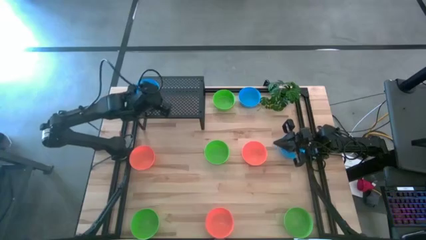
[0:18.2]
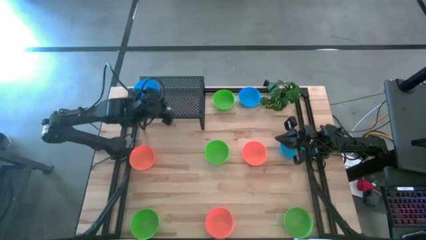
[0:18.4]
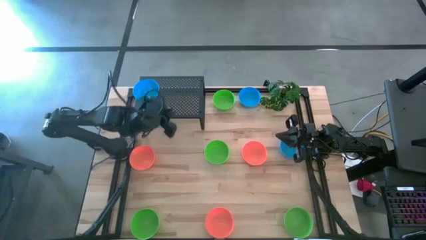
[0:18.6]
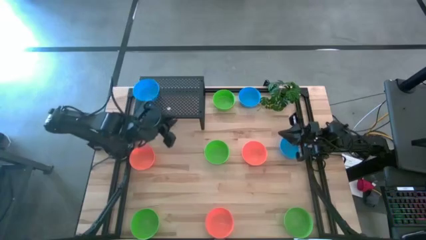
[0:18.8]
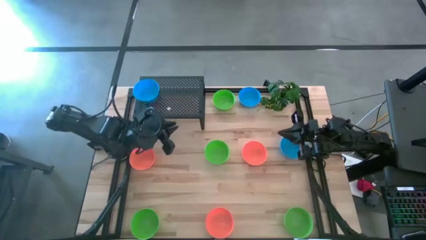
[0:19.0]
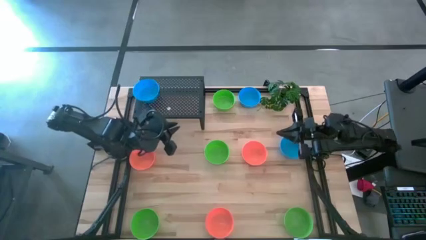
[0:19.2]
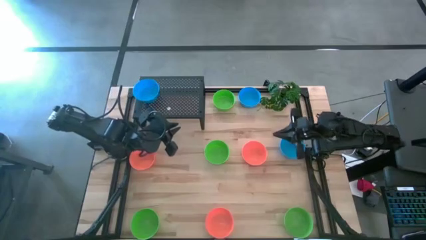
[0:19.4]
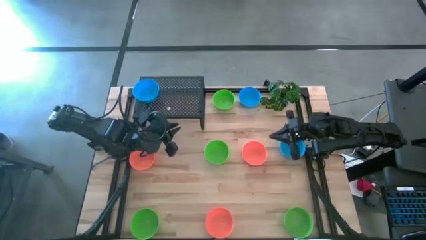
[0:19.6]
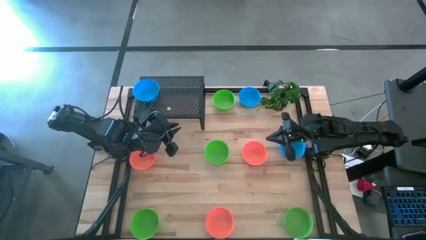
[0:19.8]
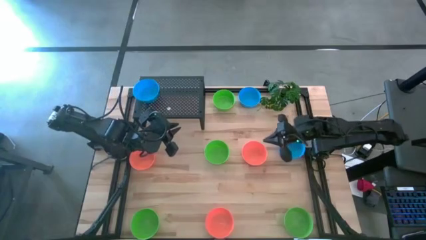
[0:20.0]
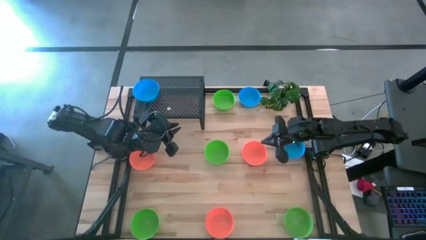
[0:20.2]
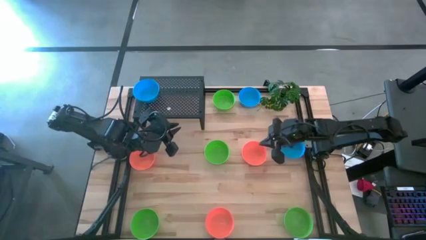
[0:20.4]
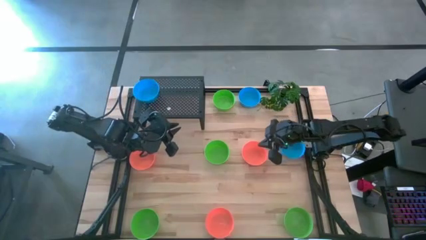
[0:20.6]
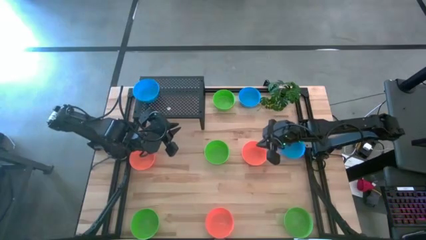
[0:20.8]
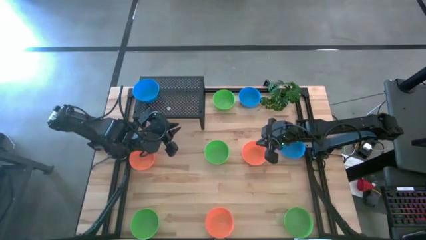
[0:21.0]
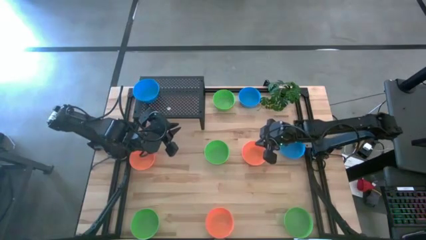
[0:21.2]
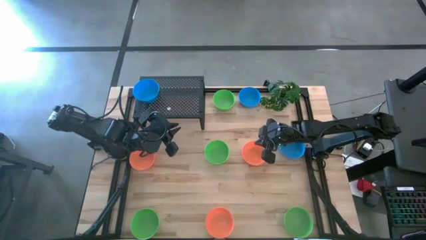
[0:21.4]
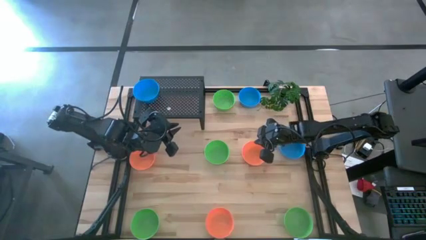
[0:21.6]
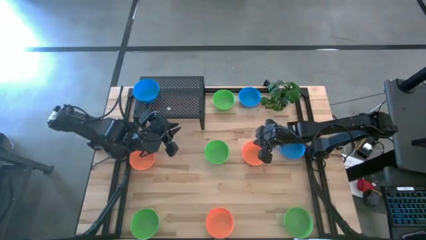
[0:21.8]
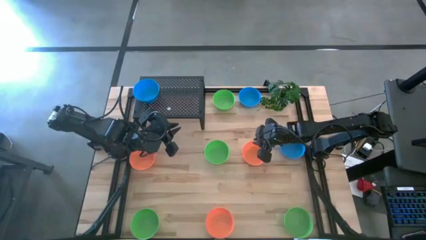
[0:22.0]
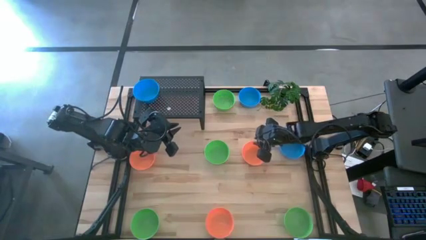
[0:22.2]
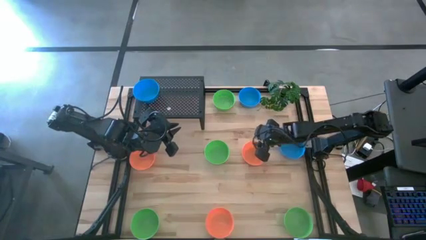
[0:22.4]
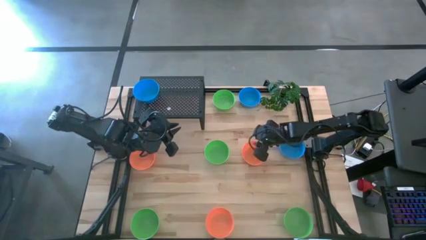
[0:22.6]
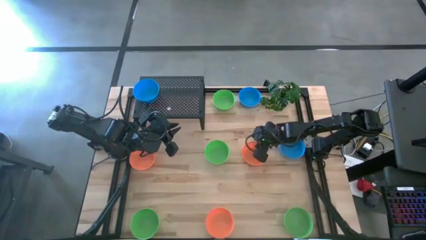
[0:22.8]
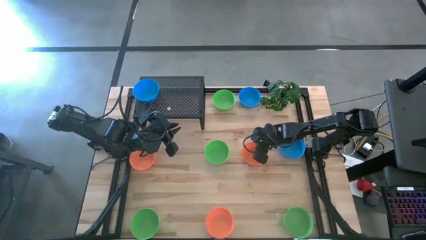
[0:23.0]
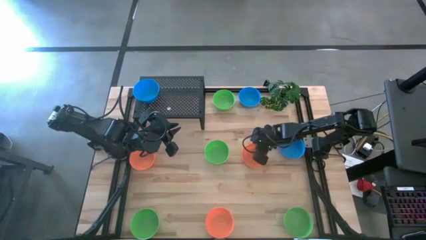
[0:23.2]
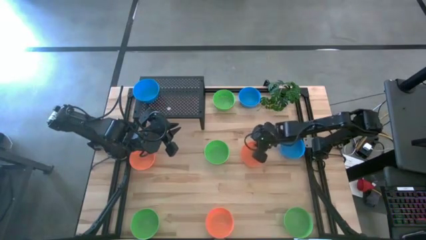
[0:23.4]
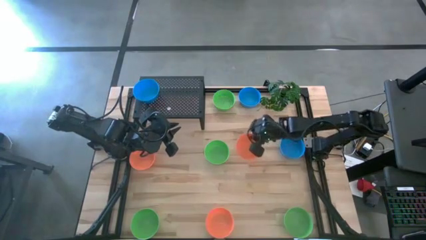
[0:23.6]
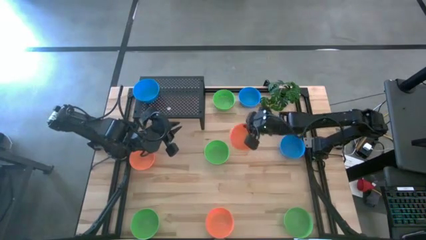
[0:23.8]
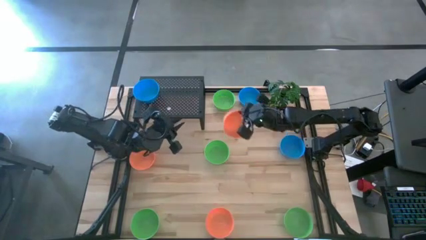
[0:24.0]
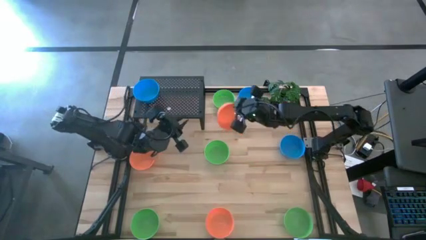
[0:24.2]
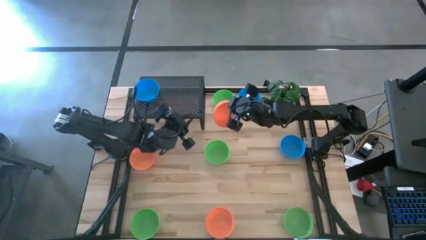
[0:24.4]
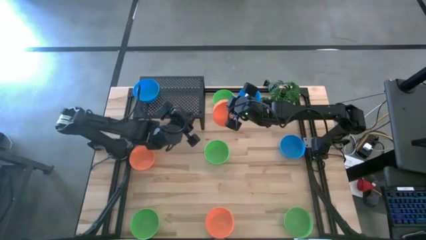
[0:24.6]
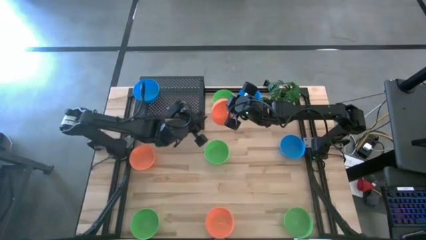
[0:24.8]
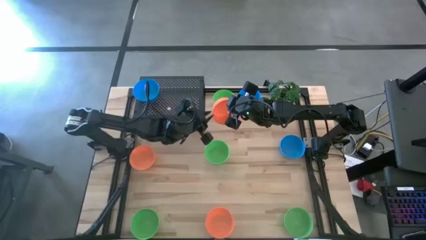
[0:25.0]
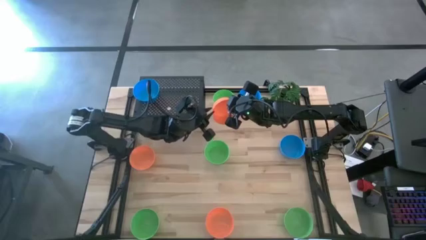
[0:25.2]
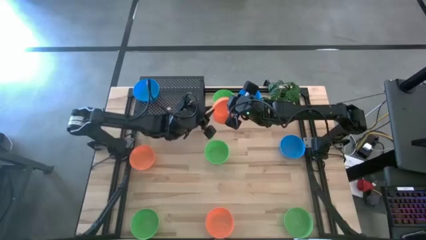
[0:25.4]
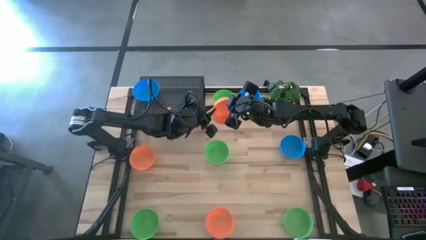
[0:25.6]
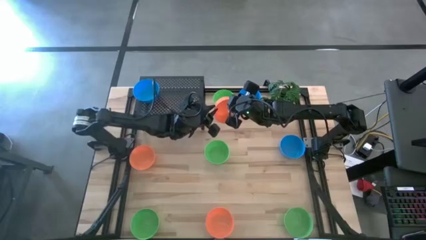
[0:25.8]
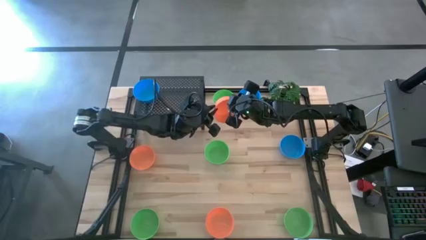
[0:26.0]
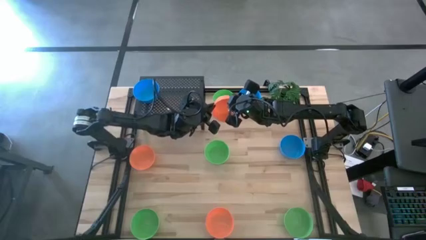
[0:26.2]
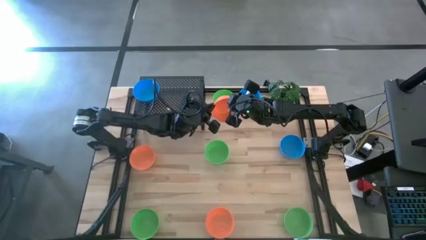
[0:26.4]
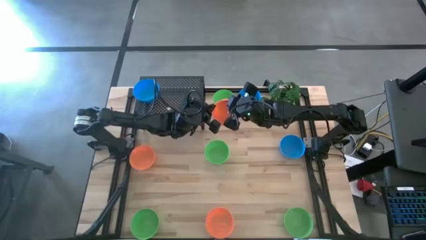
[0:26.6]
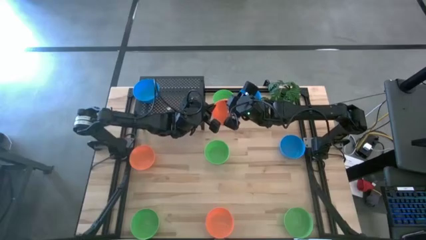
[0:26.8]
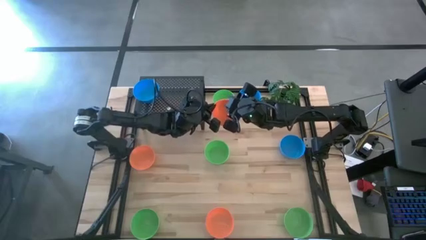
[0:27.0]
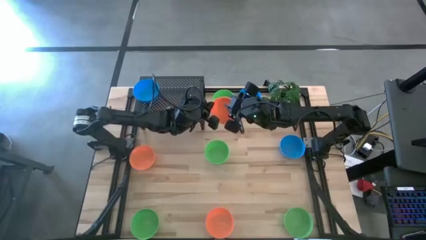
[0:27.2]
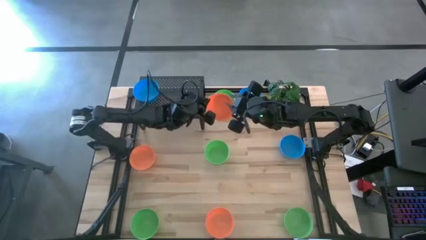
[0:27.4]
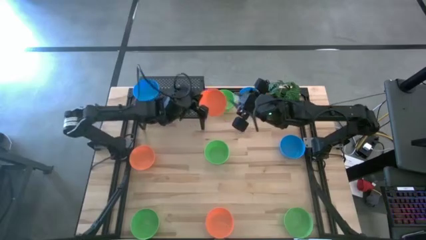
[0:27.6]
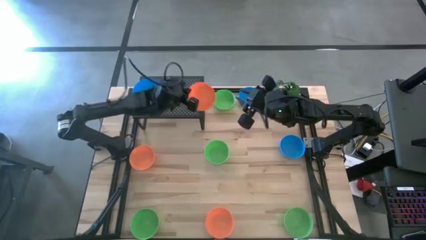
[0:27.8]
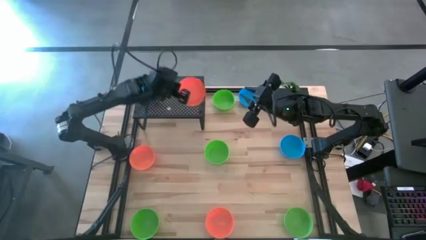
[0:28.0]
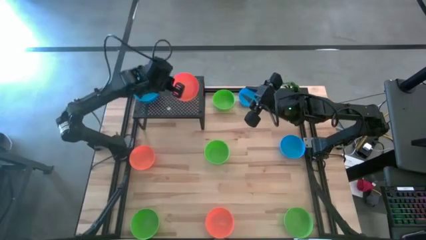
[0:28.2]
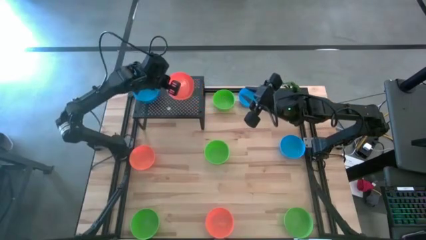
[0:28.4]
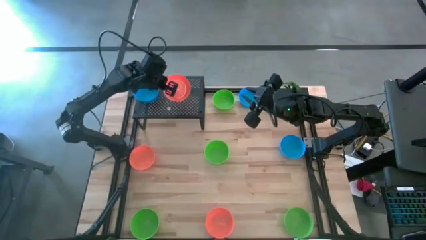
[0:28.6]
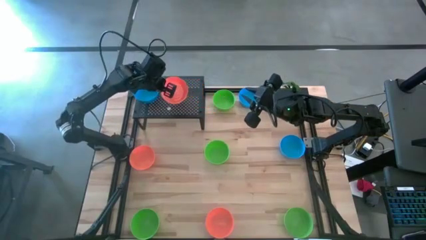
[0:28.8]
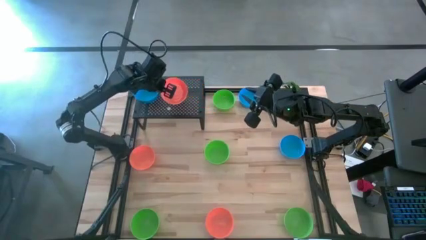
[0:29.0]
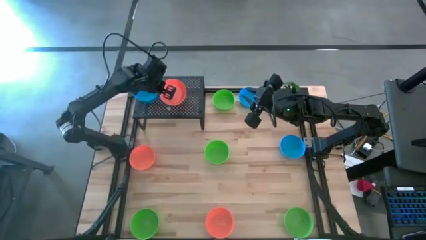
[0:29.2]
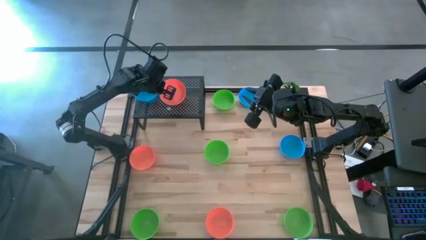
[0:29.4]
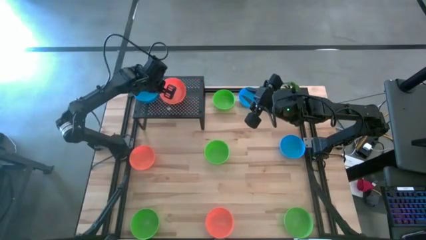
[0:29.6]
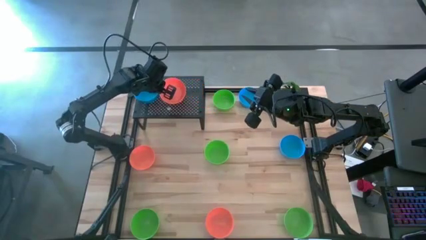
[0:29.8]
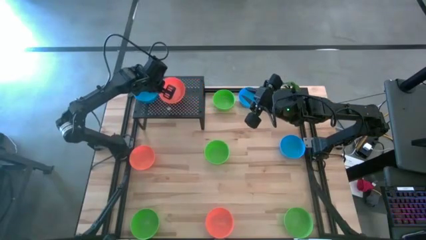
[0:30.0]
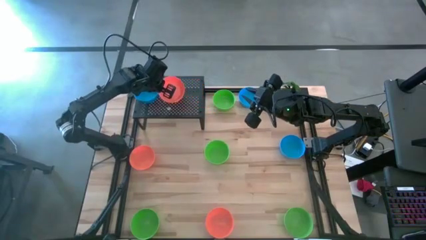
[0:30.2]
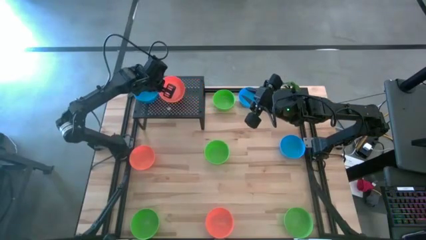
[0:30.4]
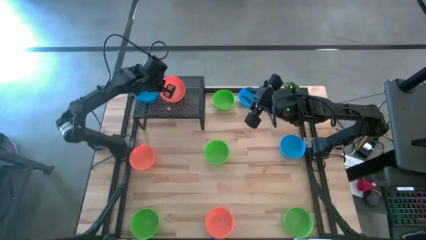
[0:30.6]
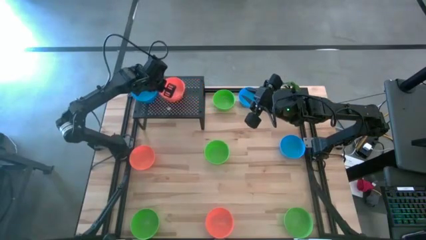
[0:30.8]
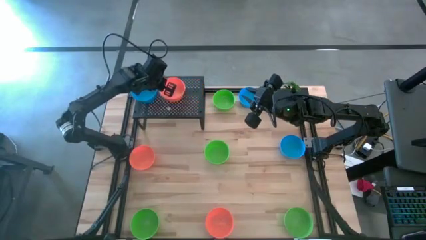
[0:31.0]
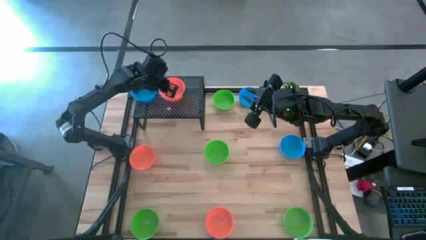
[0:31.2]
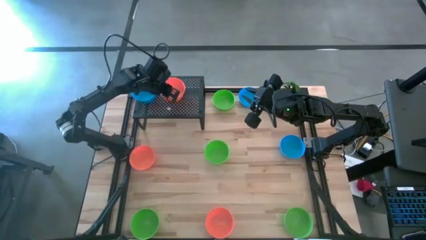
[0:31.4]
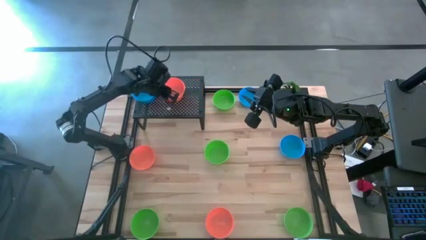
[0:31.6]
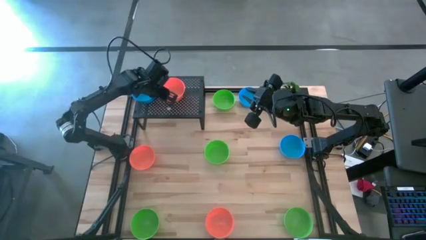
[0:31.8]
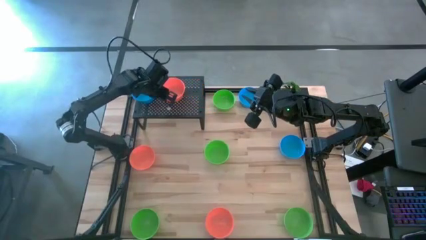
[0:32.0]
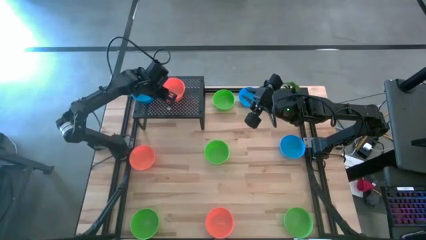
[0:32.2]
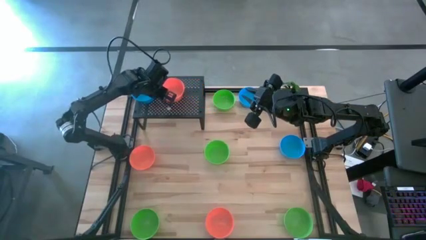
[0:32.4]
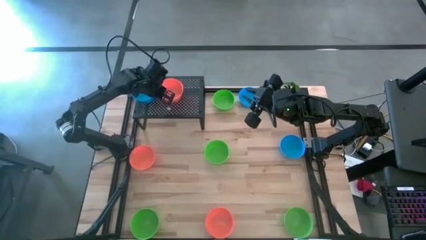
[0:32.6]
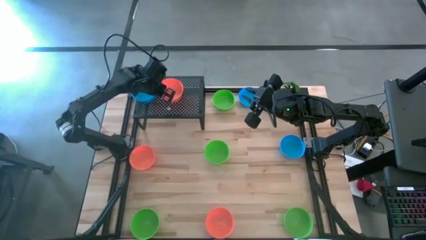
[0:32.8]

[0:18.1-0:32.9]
Task: Pick & Place Mini bowls
Put the orange bowl on the shelf
